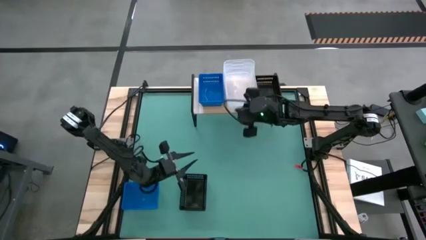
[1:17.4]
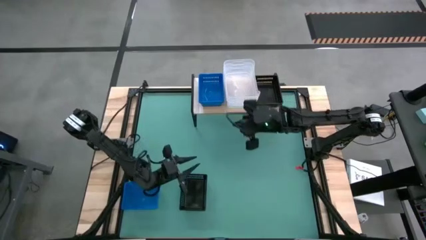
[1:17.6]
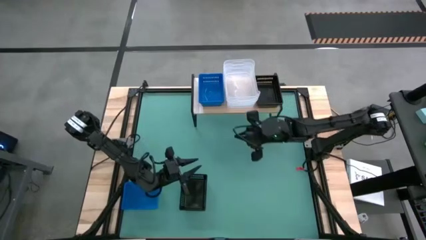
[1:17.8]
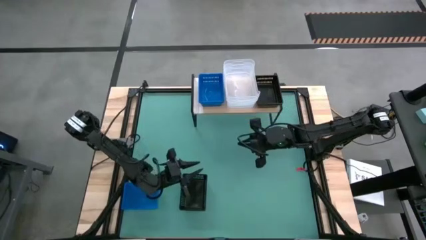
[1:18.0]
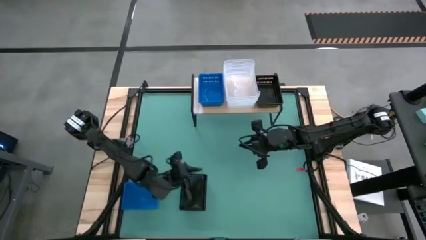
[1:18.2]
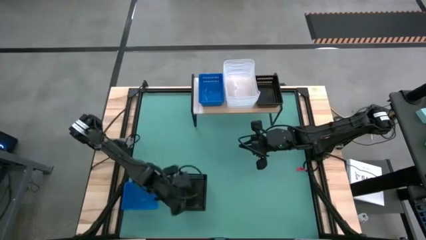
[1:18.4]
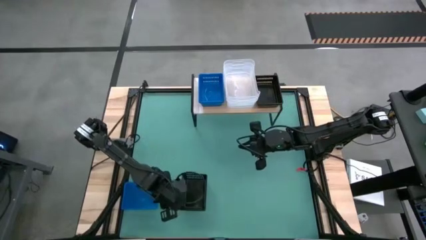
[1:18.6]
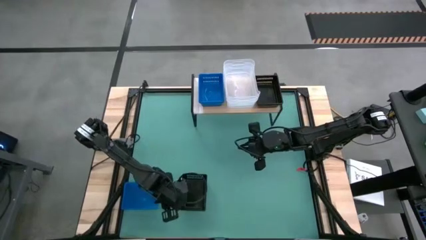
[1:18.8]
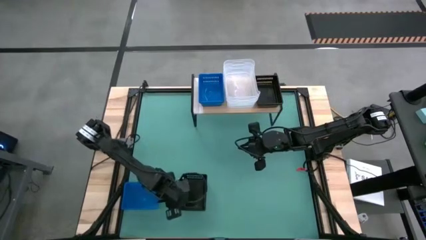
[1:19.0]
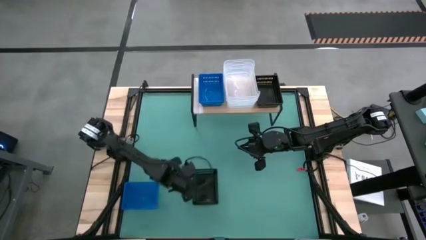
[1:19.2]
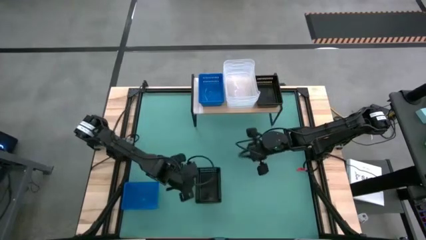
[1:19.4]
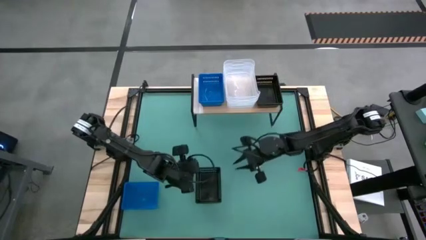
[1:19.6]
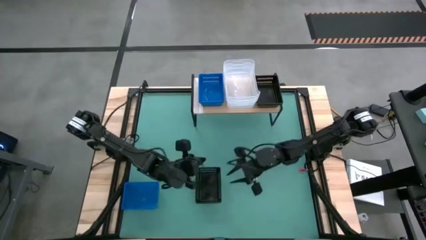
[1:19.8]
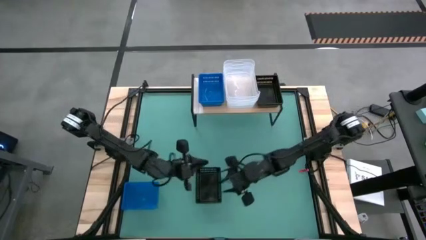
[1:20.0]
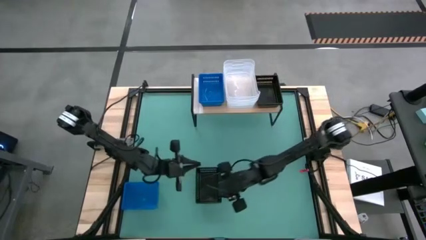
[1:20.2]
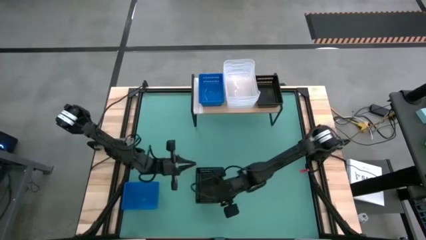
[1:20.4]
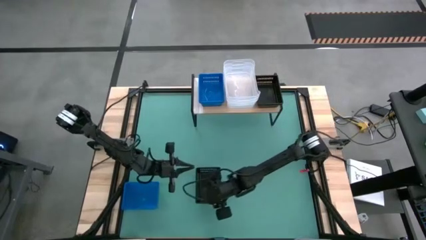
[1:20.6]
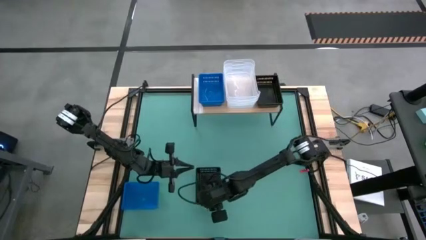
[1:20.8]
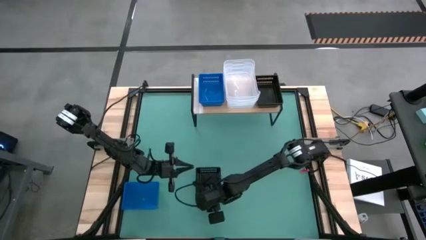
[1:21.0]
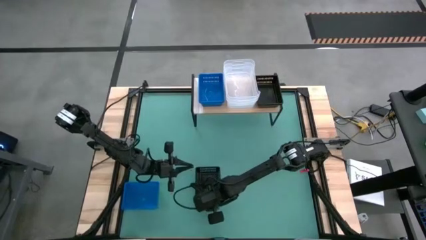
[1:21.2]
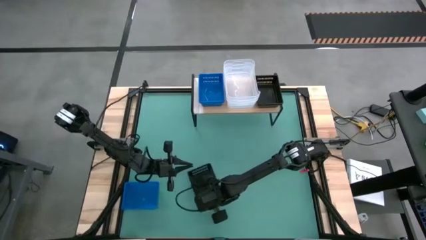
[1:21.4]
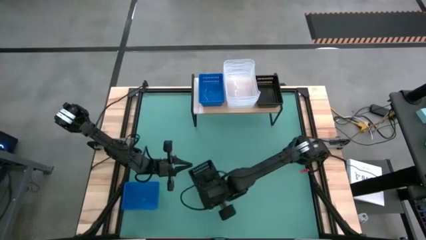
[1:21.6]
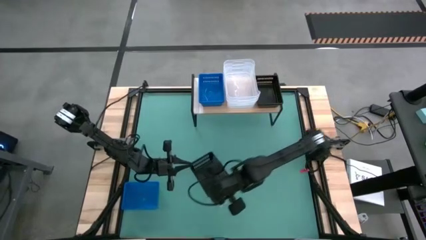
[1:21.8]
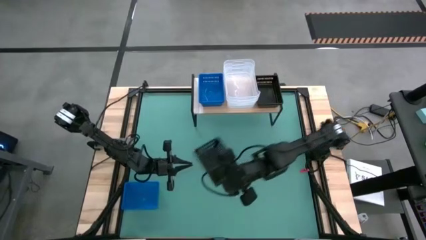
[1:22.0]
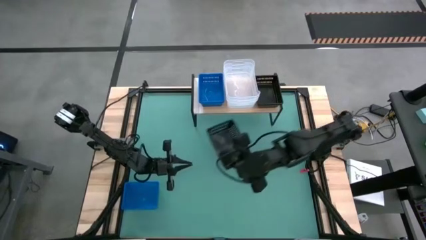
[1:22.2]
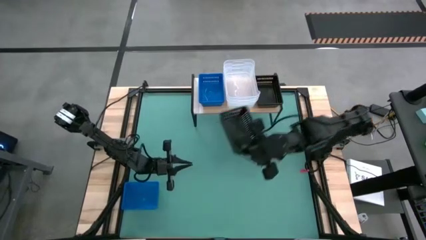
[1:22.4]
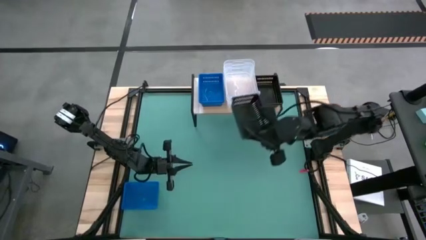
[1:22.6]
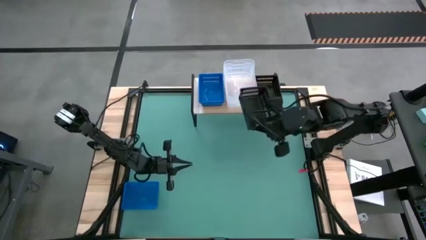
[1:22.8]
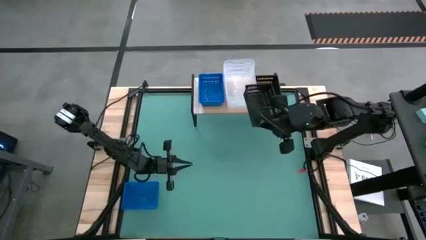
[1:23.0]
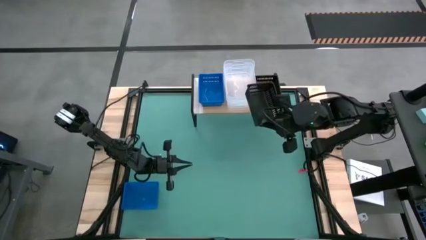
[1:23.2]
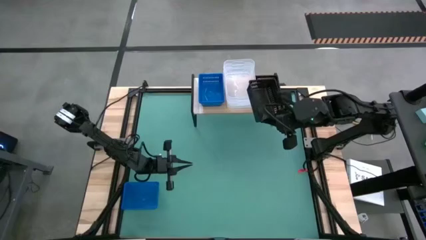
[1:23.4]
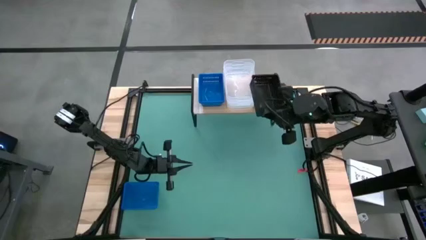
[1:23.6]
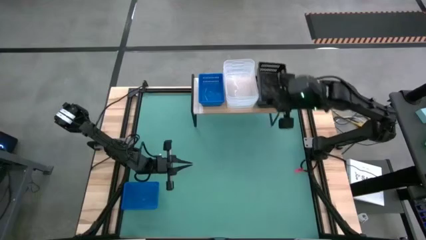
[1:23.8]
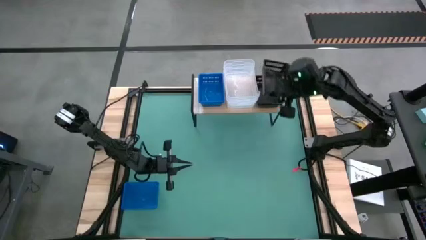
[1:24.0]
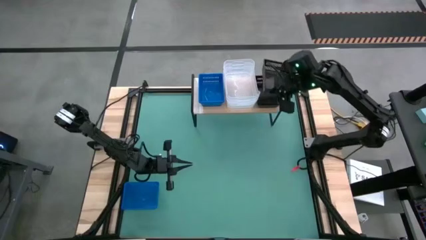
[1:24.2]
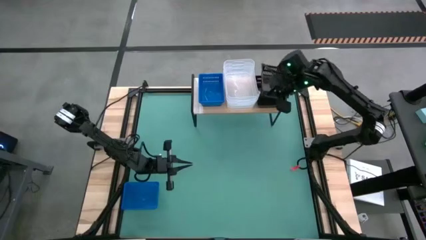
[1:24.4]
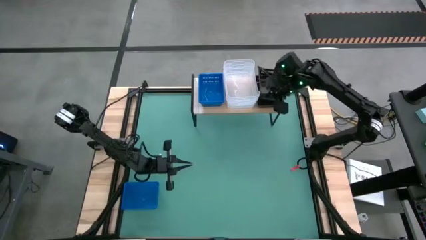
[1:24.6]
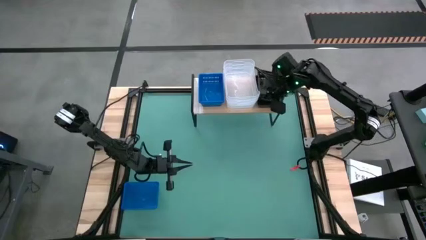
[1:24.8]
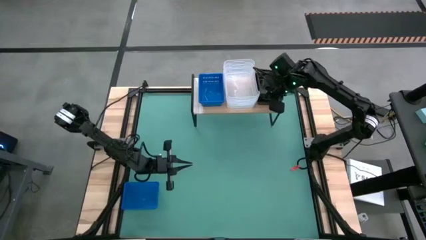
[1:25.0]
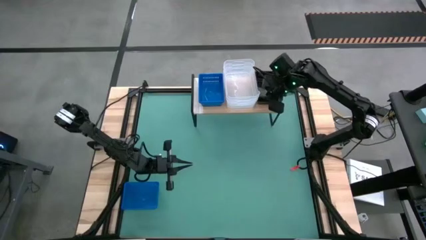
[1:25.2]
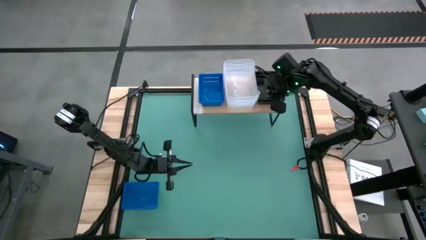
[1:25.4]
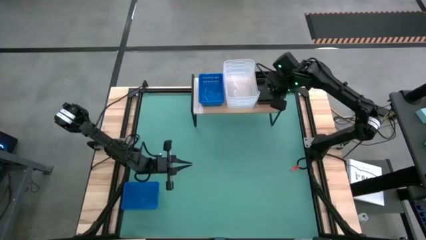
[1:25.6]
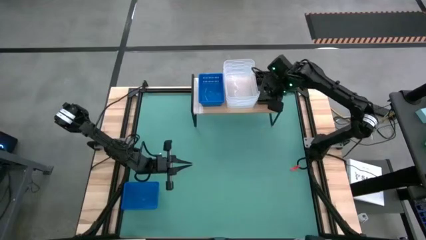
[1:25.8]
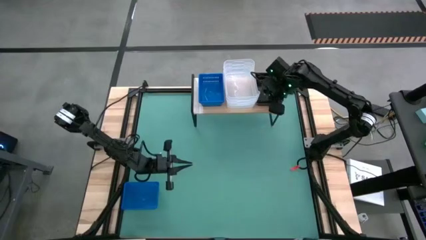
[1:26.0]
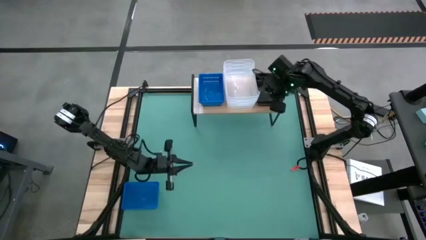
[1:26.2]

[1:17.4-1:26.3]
Task: Stack baskets on shelf by color
Stack the black bin on the black bin on the shelf

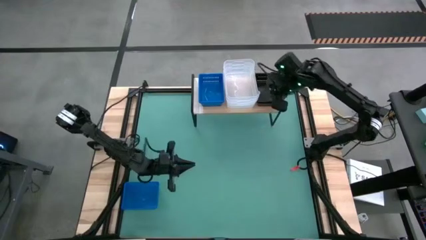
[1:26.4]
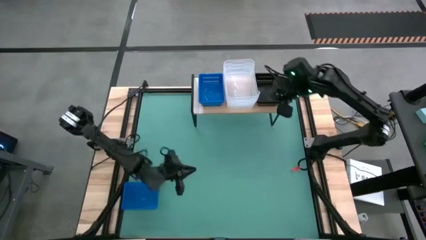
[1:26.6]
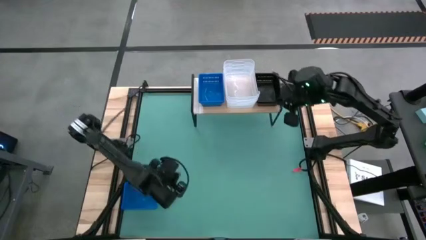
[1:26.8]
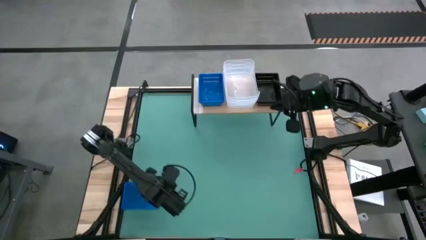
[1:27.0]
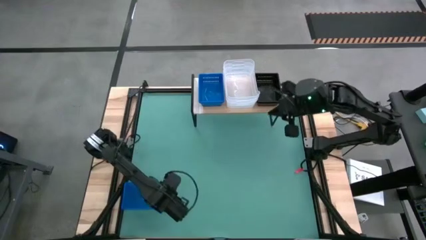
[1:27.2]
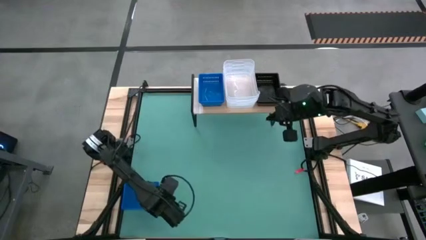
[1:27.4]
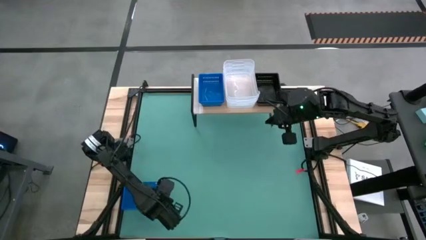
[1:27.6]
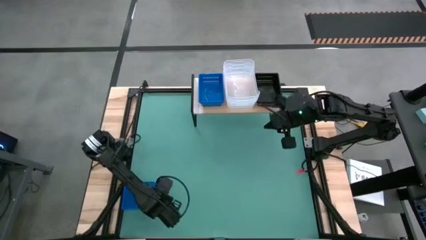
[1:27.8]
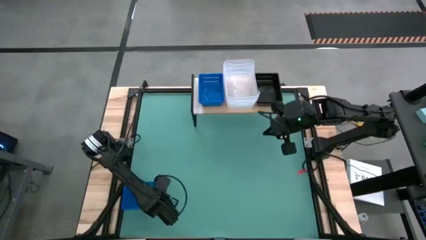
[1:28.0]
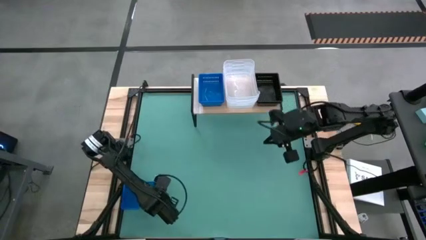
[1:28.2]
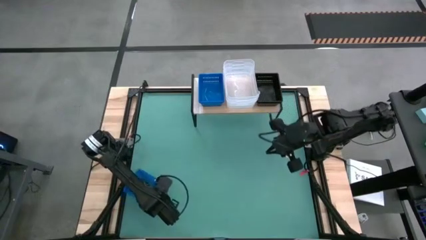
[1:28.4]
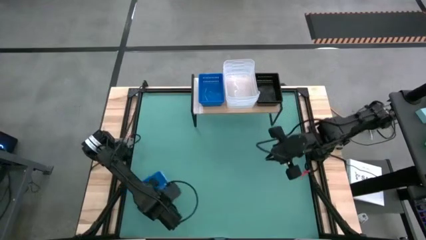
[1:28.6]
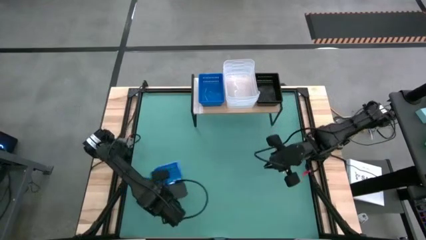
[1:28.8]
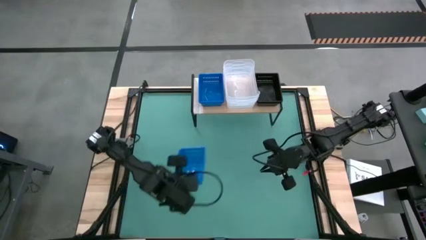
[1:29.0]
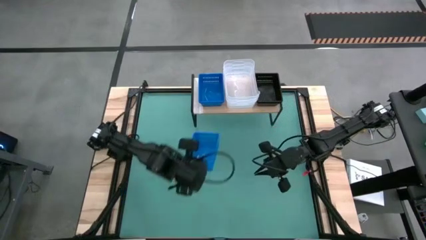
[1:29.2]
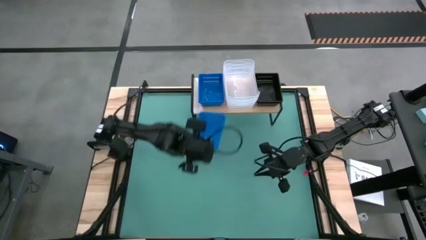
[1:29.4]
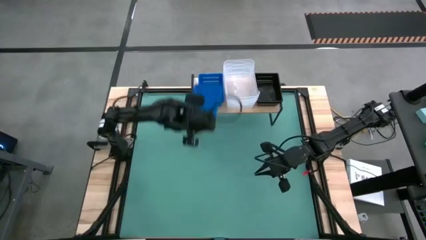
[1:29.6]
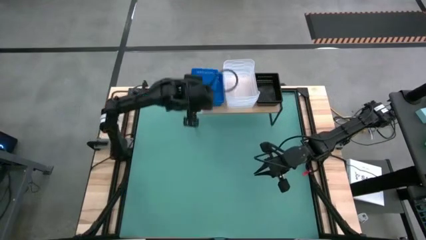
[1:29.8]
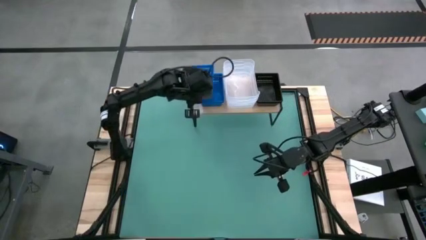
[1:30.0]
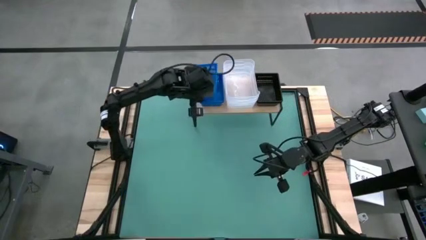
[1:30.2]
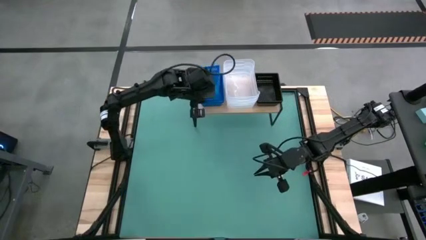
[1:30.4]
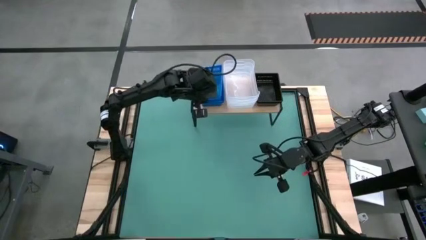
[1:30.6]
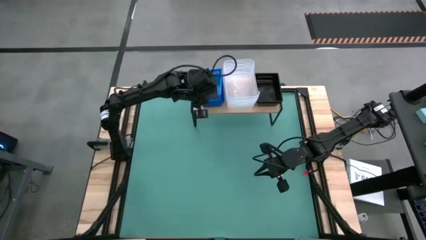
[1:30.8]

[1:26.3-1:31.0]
Stack the blue bin on the blue bin on the shelf
